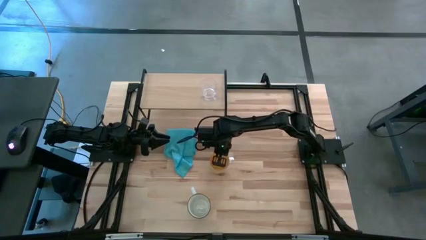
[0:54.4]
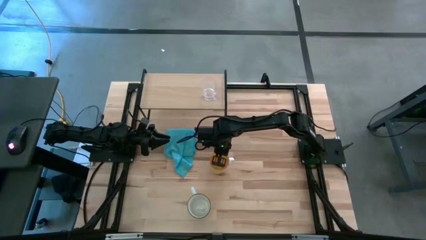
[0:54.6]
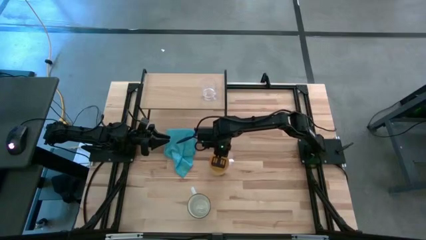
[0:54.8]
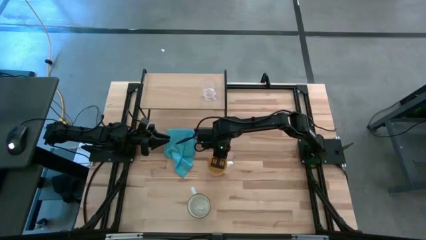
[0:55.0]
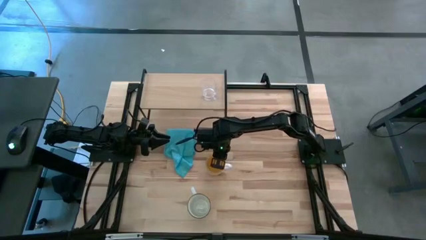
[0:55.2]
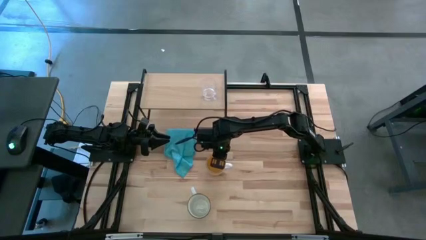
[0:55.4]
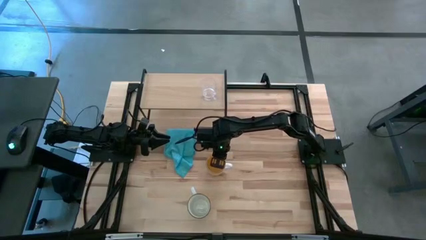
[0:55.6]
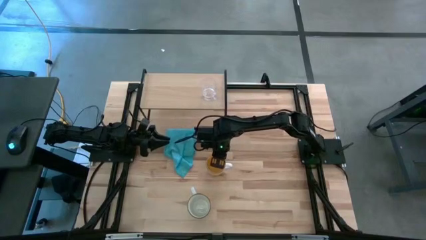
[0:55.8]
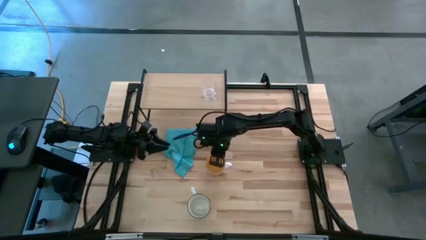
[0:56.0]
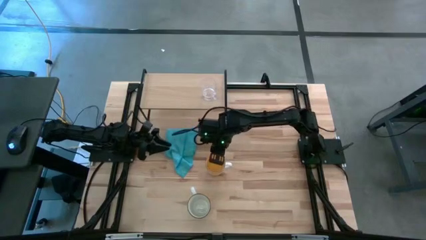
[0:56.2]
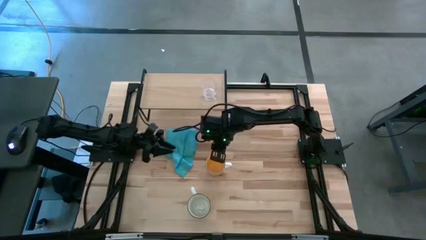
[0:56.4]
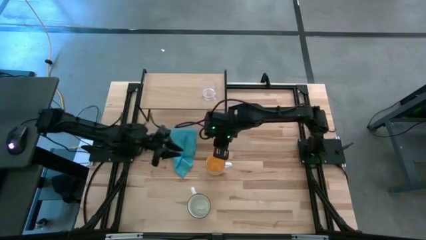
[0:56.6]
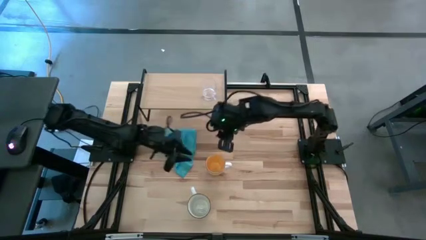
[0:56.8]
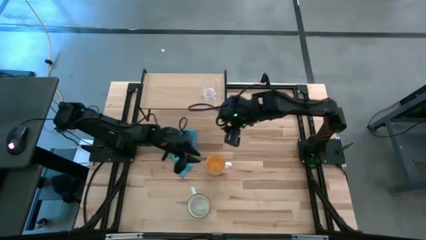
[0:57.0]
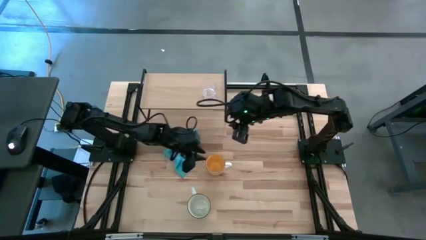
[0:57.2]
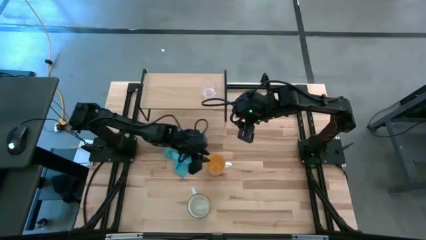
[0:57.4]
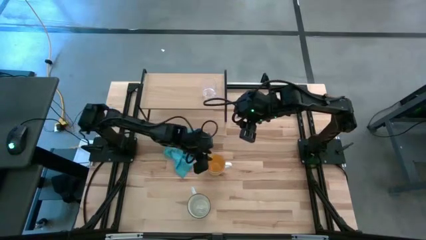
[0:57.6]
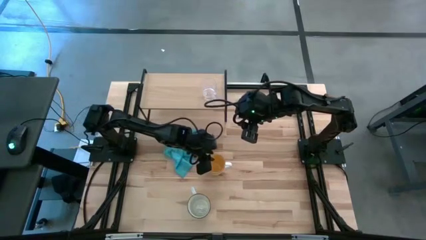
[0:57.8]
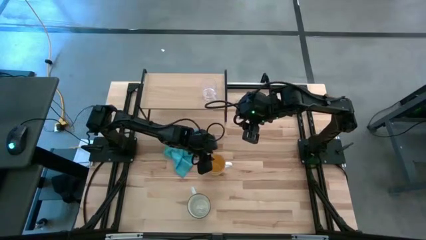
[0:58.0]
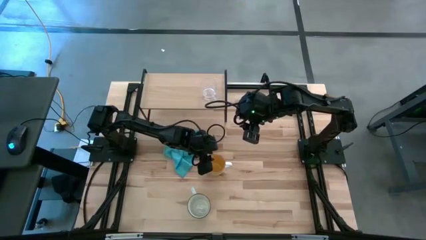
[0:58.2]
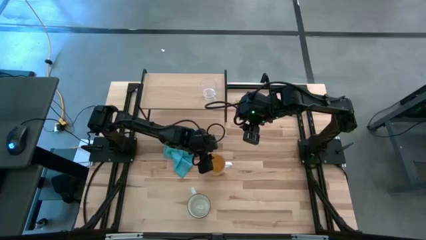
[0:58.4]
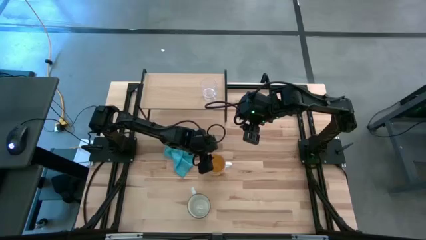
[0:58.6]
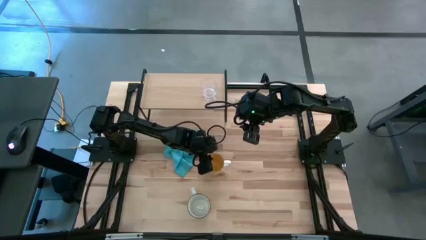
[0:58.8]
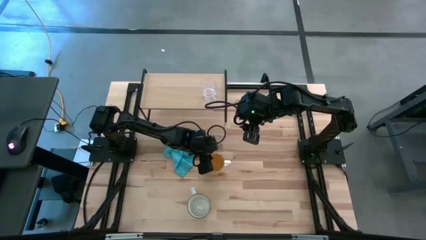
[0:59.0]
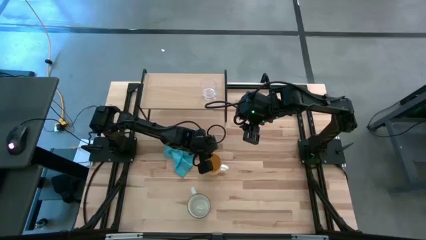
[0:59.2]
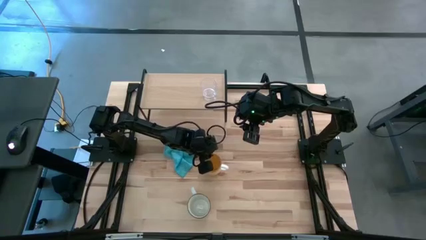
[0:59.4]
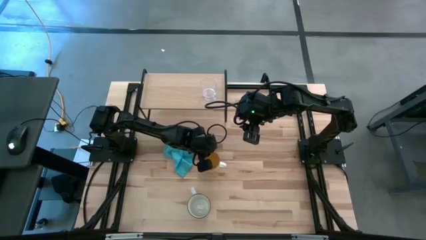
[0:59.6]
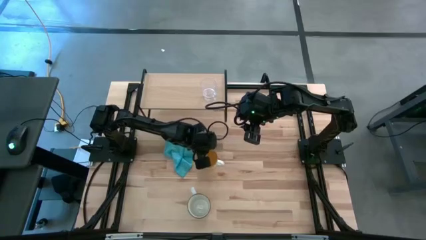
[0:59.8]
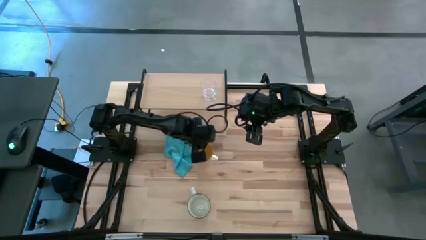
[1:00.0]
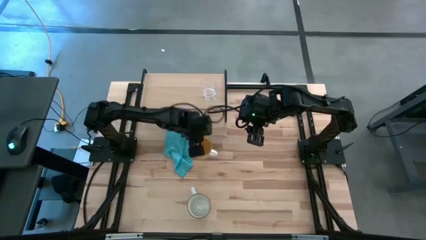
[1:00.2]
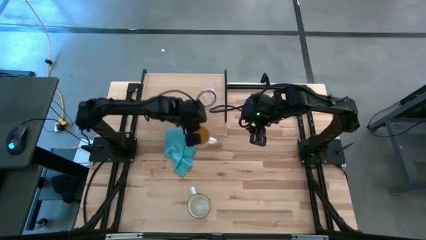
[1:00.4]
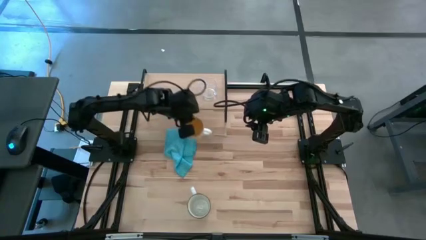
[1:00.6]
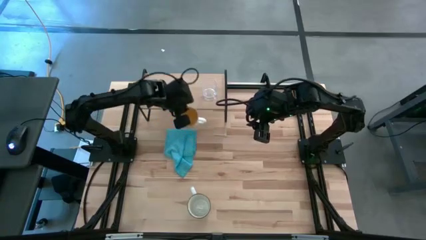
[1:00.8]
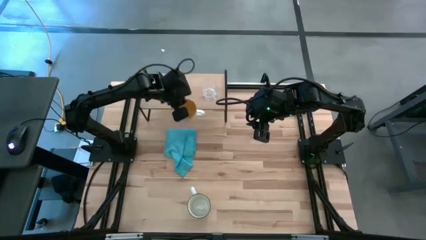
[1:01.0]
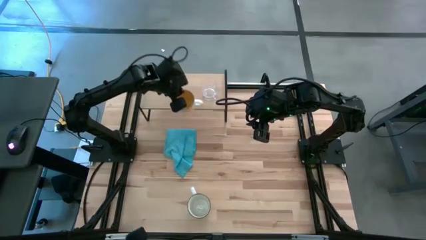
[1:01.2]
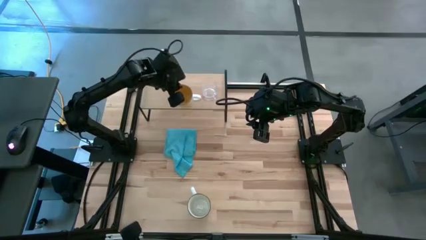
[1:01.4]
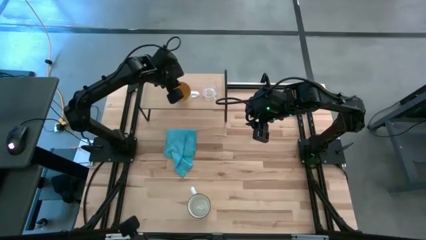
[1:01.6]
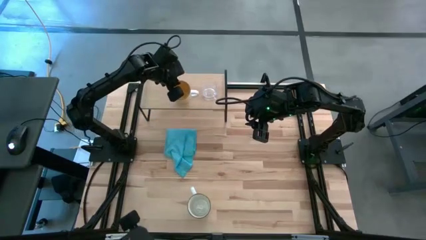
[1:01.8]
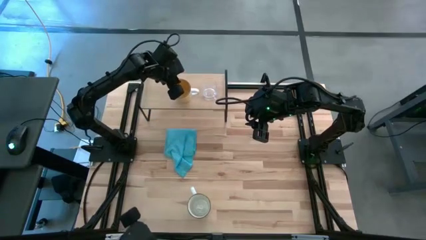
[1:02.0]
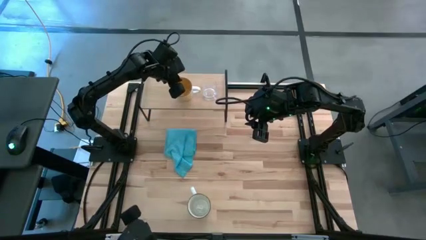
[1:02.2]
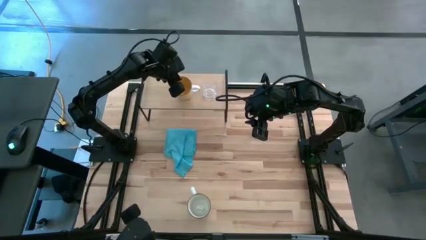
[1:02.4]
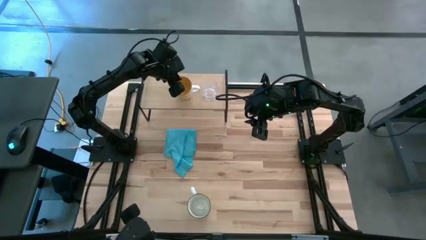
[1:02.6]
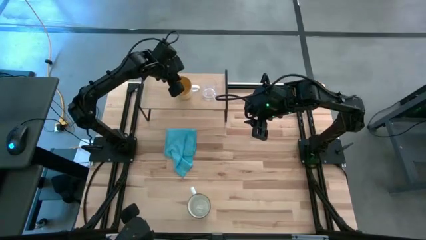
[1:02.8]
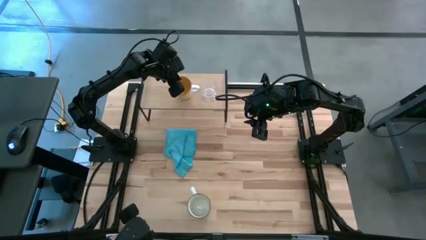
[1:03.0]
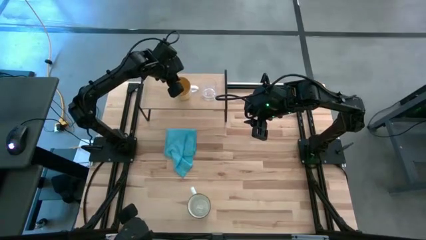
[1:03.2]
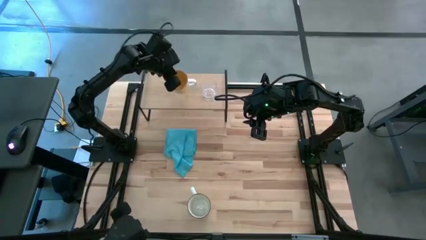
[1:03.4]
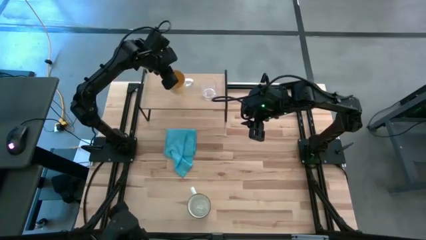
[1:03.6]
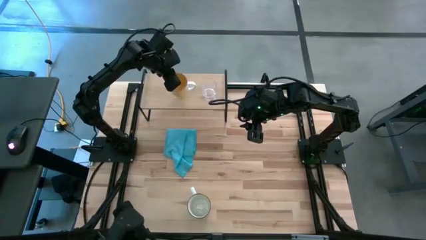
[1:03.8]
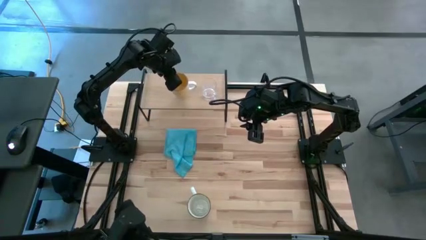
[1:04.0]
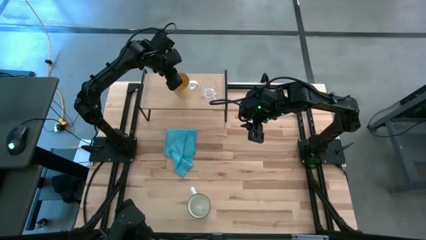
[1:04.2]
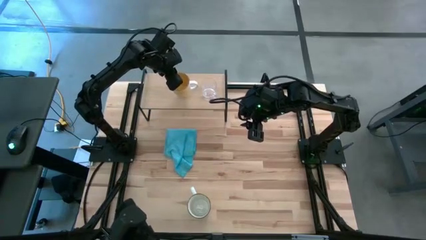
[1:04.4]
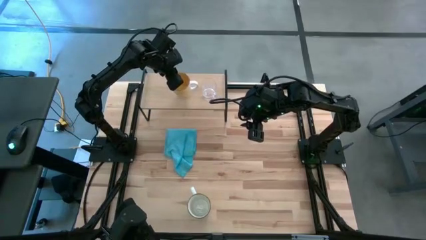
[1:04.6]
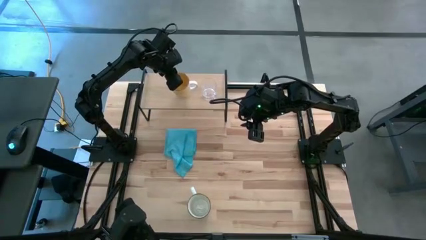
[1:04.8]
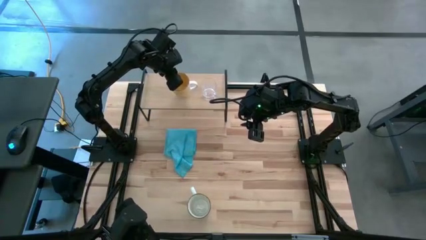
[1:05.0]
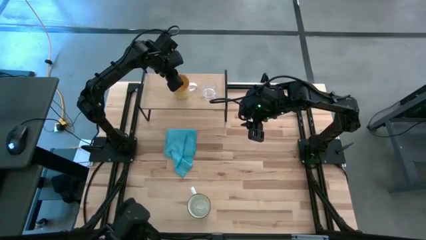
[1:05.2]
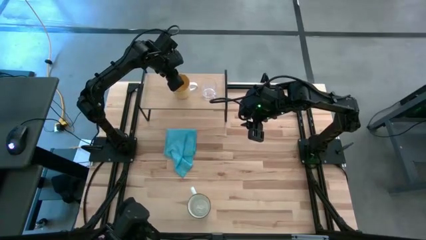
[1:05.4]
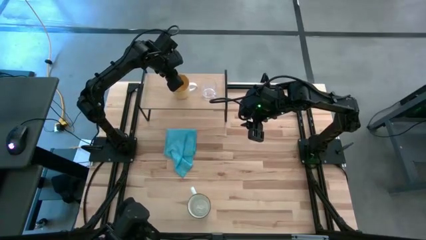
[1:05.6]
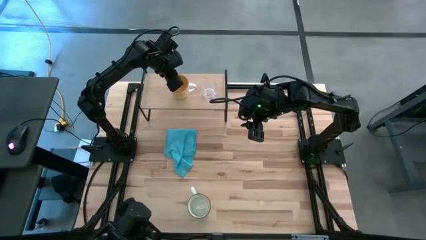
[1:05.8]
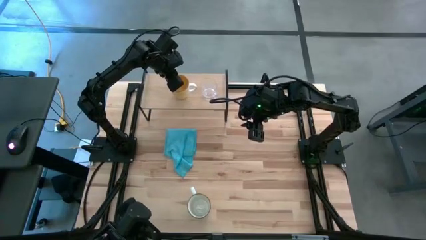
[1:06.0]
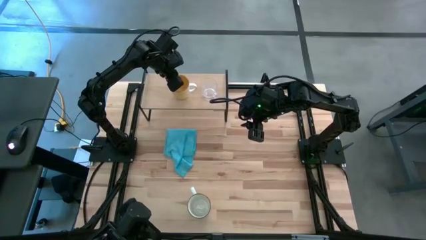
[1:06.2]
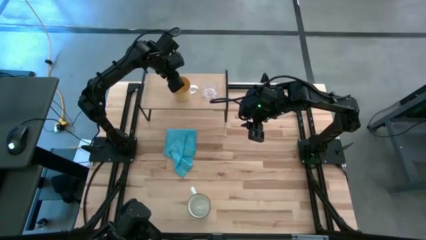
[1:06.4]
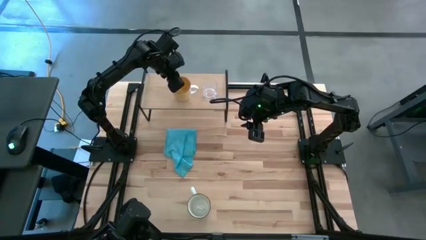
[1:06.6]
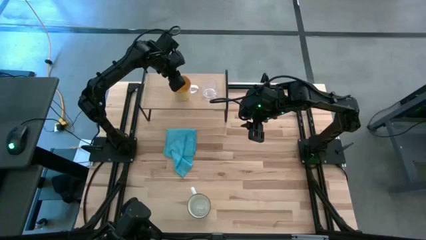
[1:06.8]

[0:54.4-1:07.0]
Task: Stack small to large cups/mugs on shelf
Put the yellow mug on the shelf

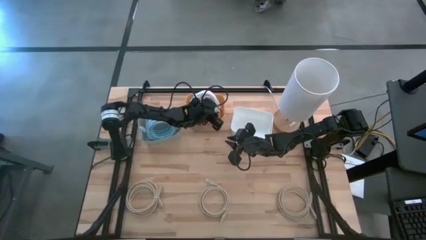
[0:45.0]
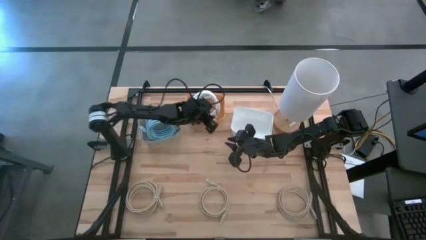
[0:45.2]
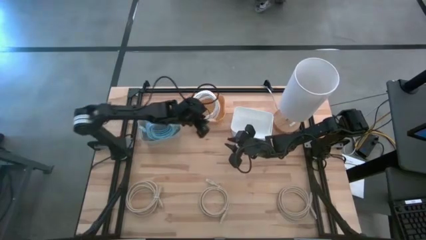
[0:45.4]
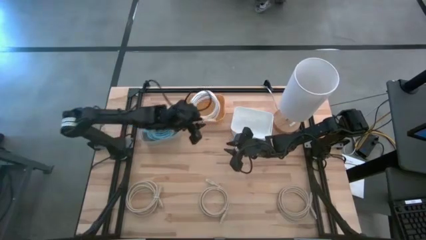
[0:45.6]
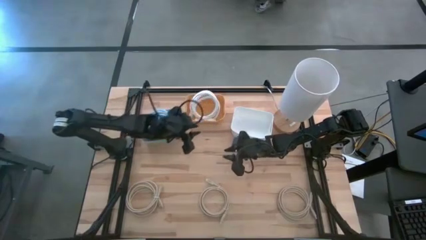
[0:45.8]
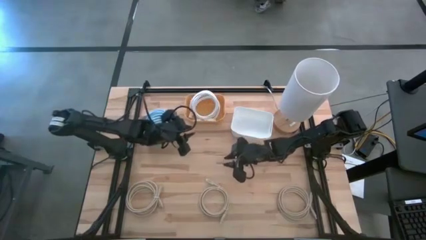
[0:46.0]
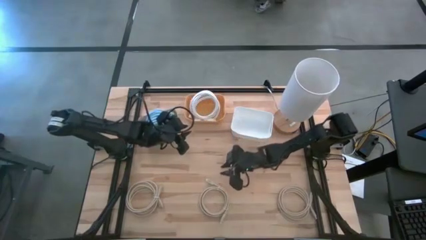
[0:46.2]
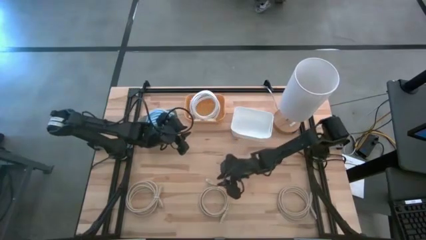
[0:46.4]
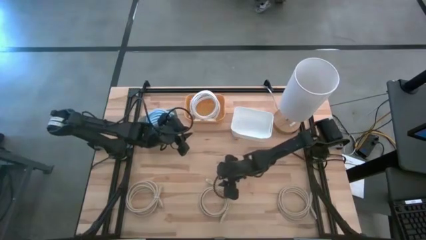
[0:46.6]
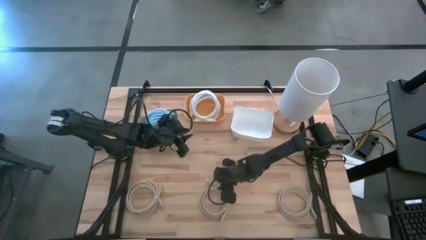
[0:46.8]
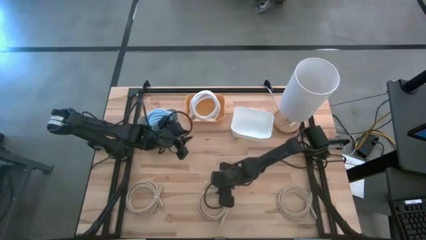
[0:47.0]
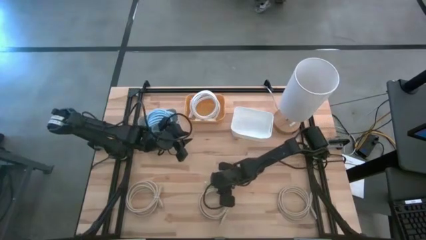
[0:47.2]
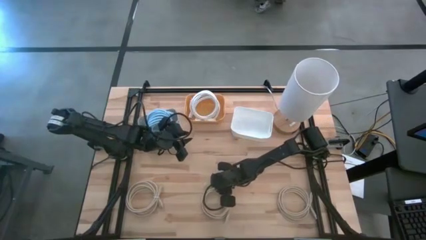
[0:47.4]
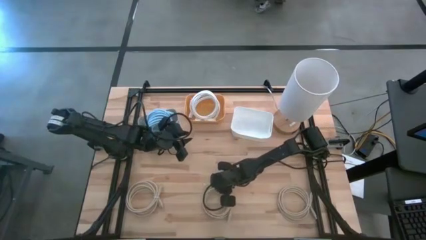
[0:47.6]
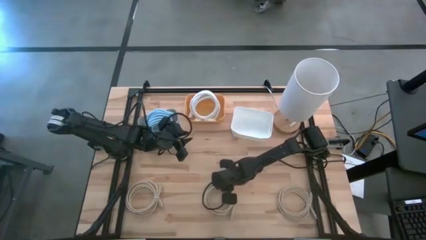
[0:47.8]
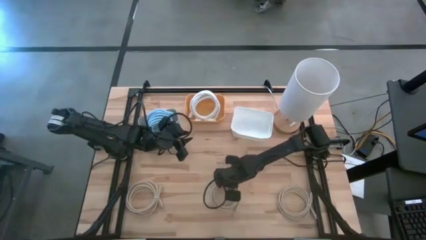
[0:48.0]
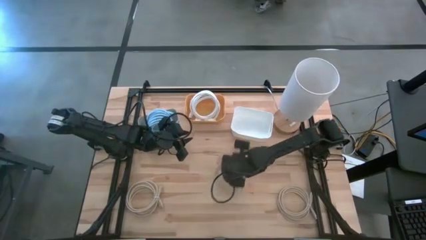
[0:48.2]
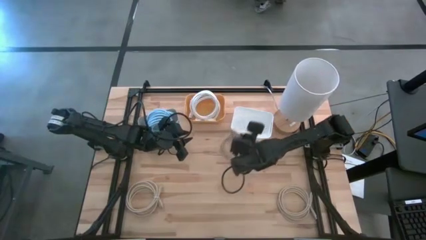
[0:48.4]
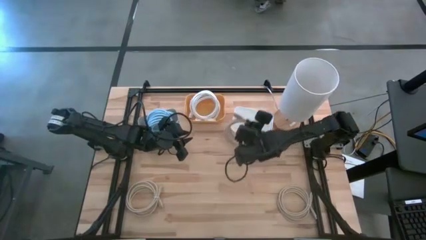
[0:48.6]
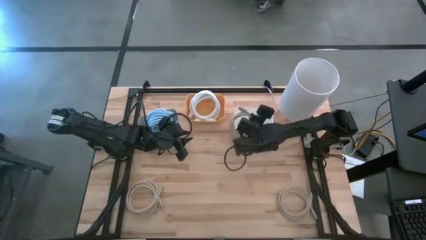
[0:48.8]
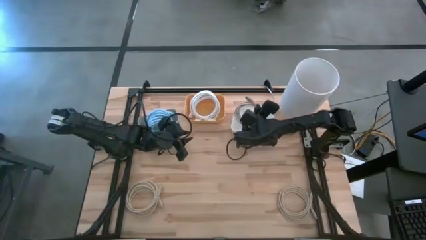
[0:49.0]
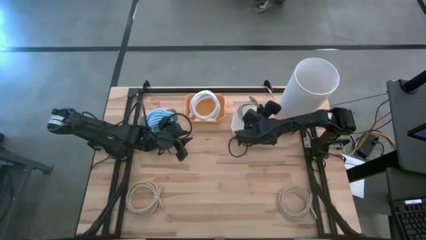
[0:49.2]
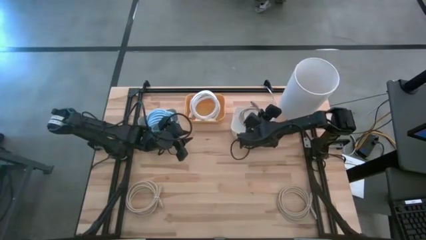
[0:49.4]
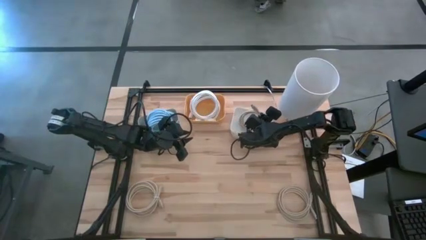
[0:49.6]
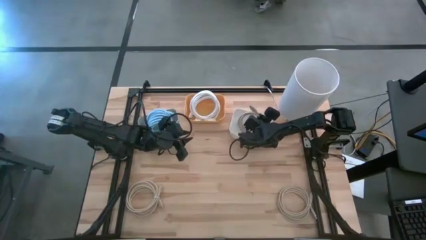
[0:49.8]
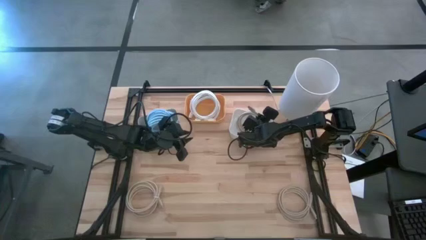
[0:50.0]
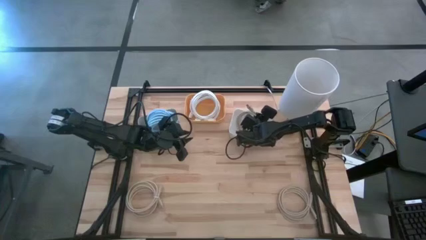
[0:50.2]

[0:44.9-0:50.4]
Task: Sort HDMI cables
Put the middle brown hdmi cable into the white bin
